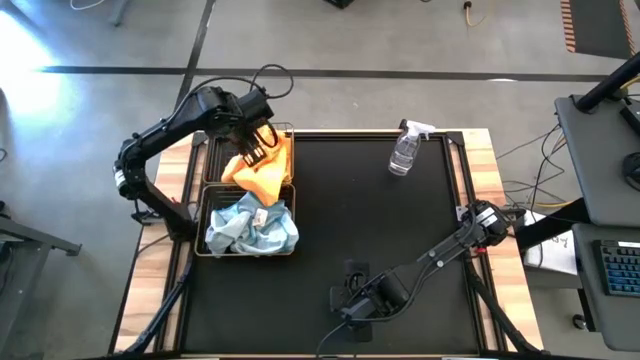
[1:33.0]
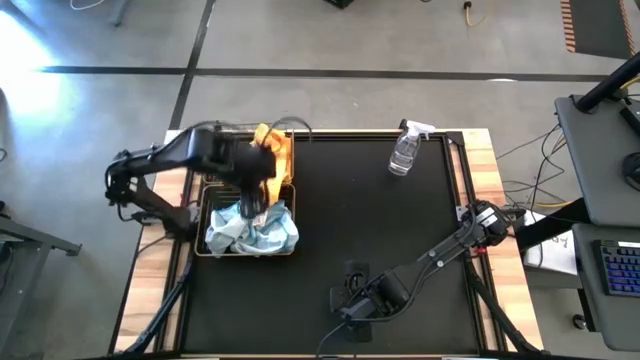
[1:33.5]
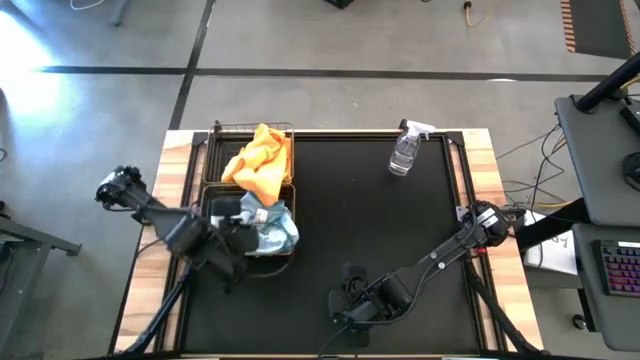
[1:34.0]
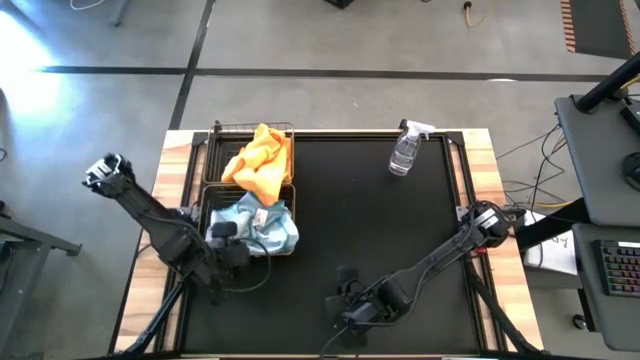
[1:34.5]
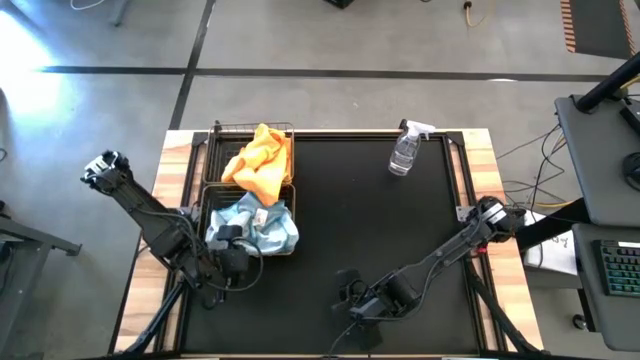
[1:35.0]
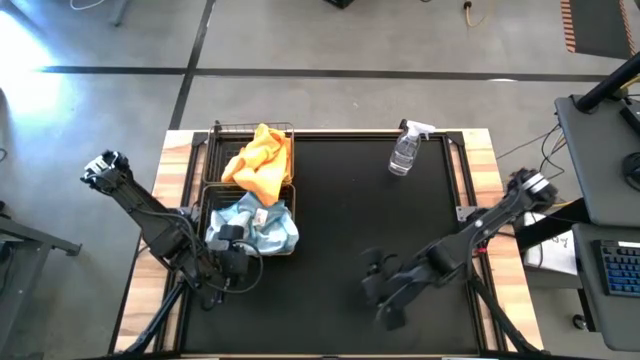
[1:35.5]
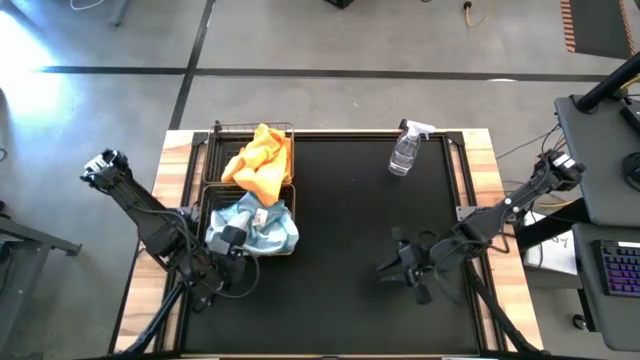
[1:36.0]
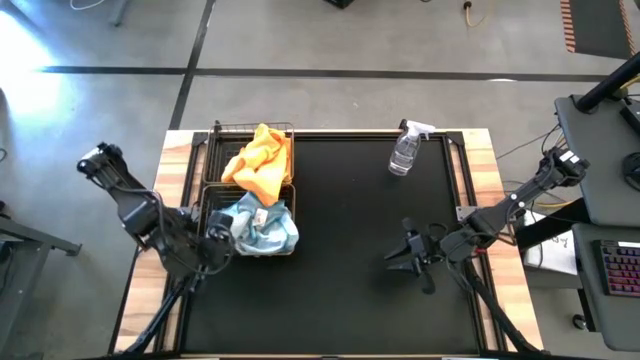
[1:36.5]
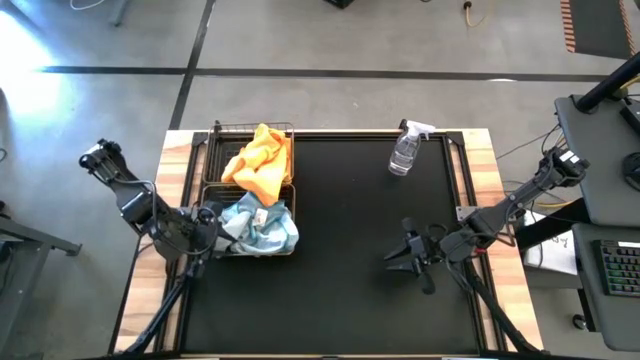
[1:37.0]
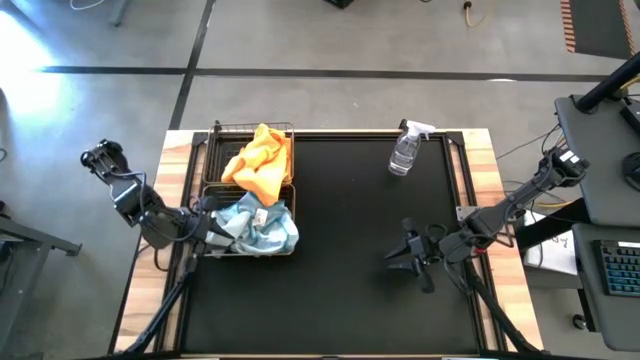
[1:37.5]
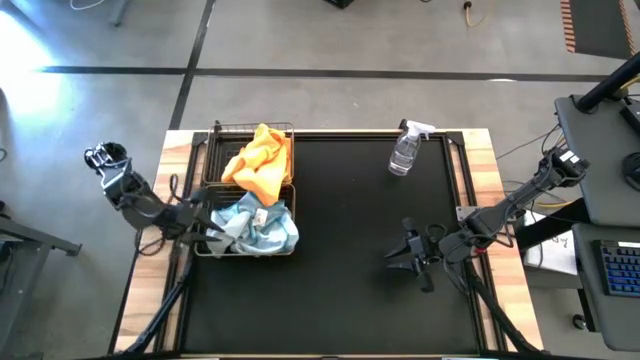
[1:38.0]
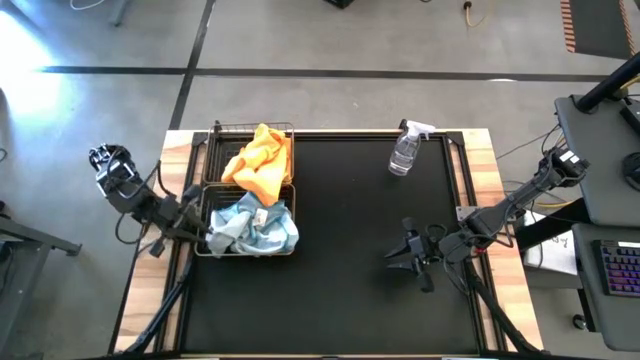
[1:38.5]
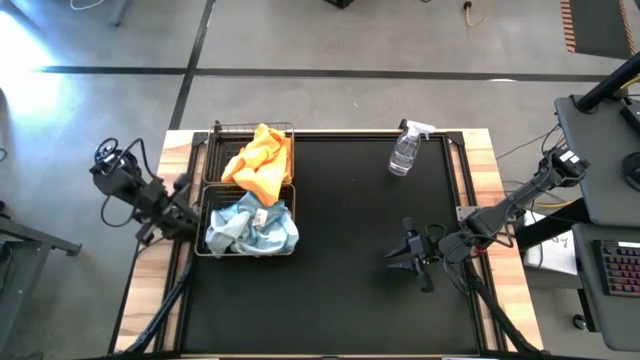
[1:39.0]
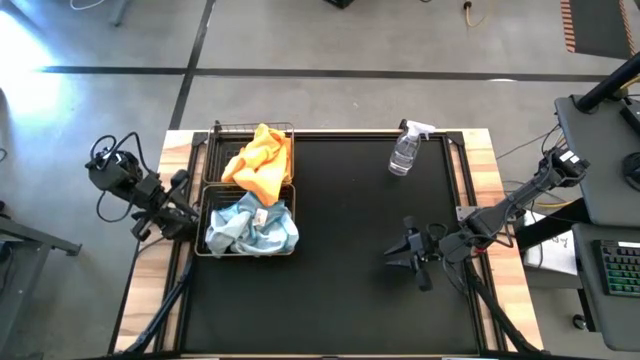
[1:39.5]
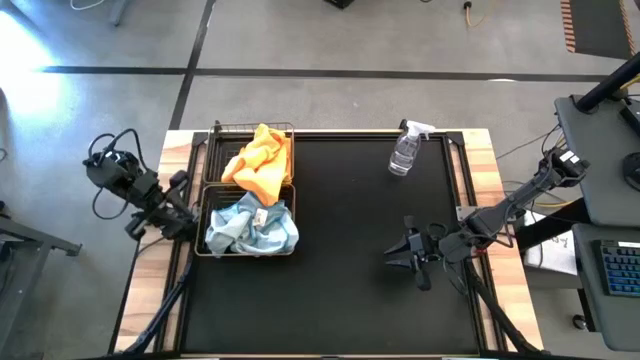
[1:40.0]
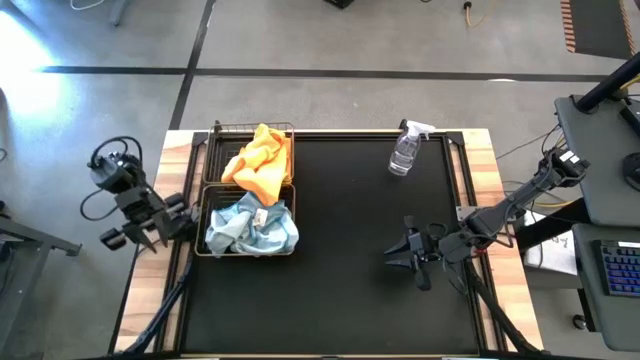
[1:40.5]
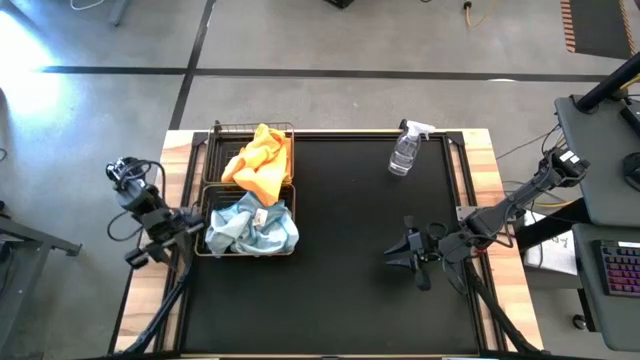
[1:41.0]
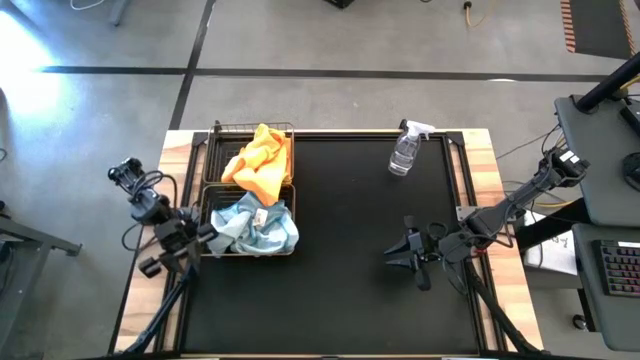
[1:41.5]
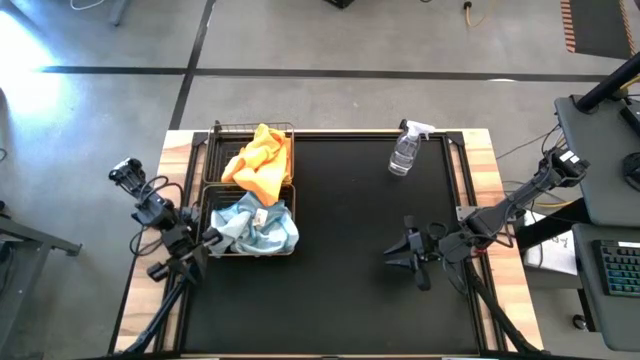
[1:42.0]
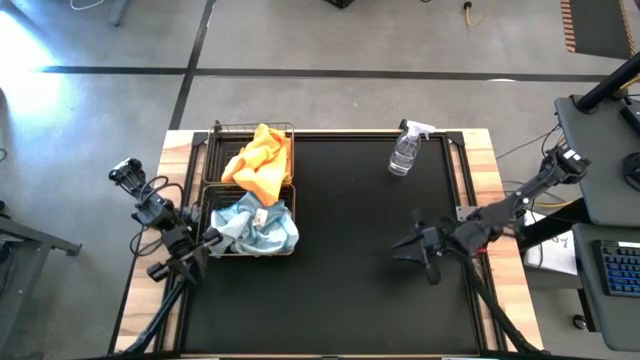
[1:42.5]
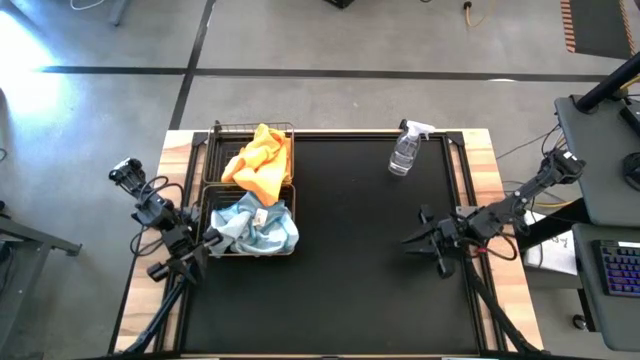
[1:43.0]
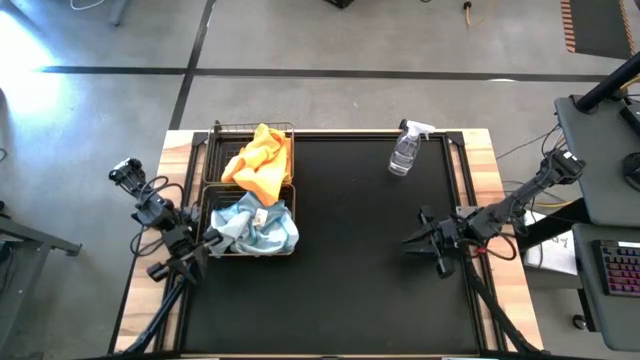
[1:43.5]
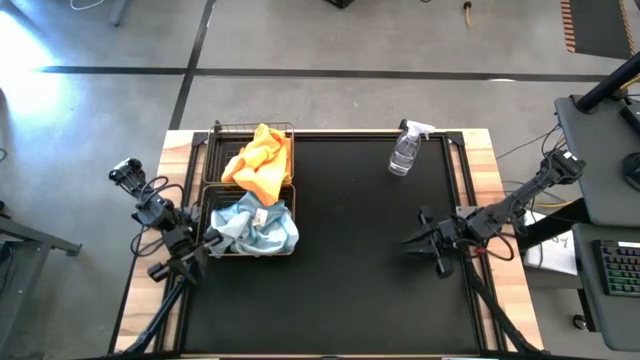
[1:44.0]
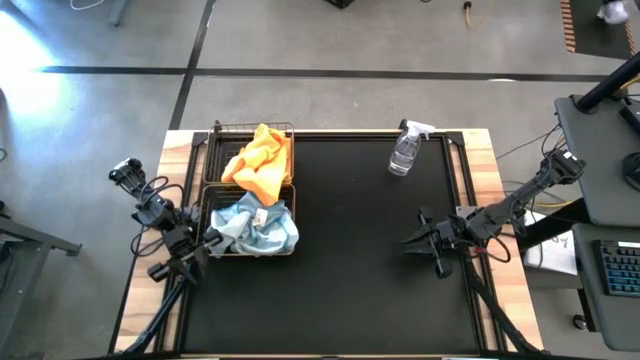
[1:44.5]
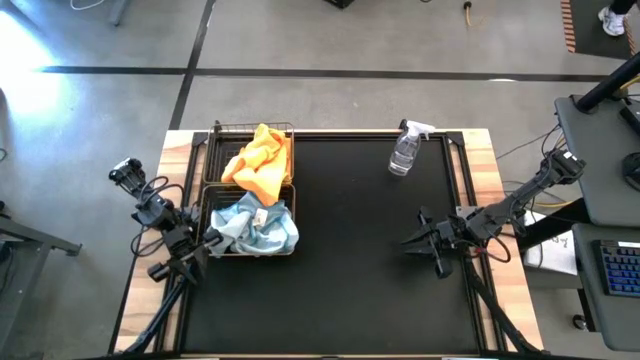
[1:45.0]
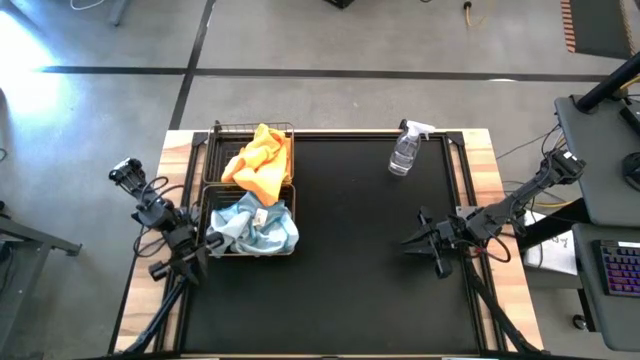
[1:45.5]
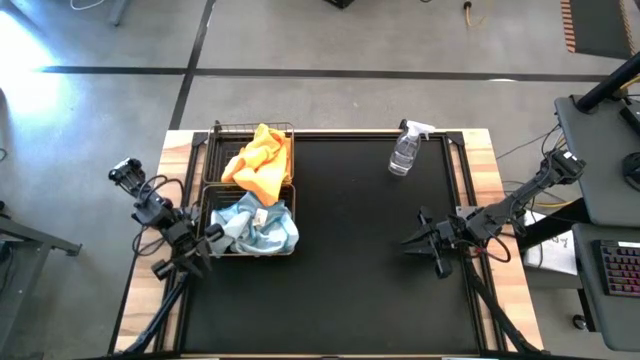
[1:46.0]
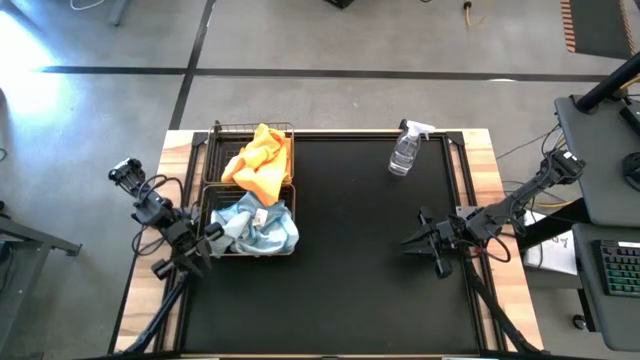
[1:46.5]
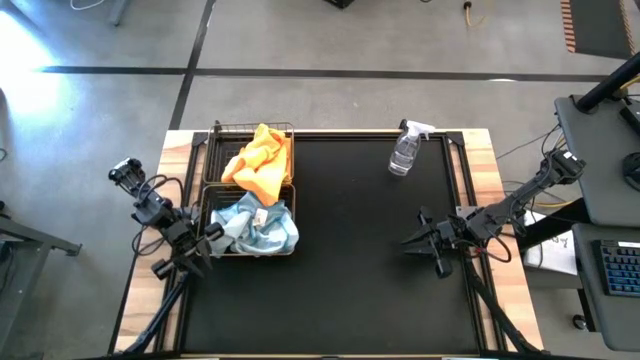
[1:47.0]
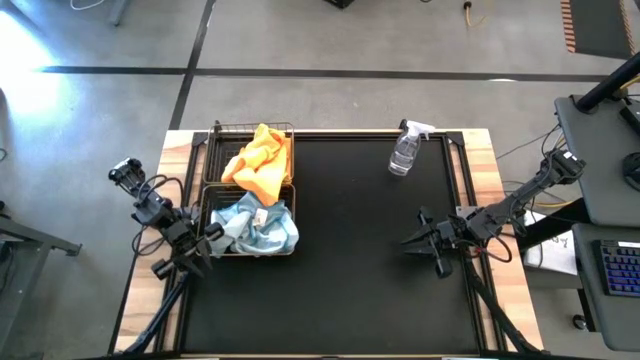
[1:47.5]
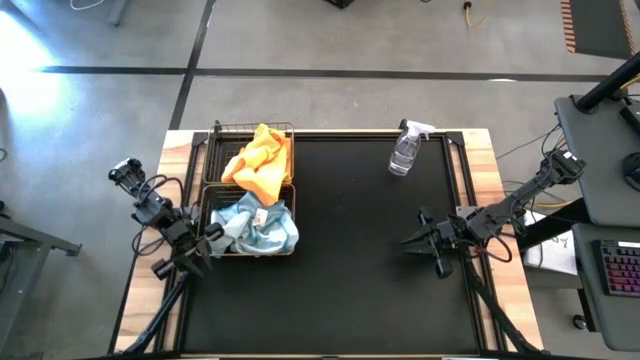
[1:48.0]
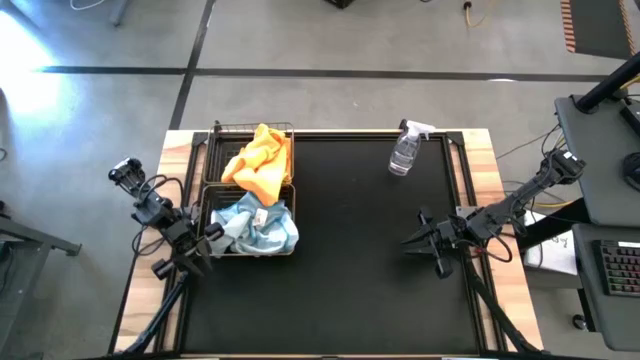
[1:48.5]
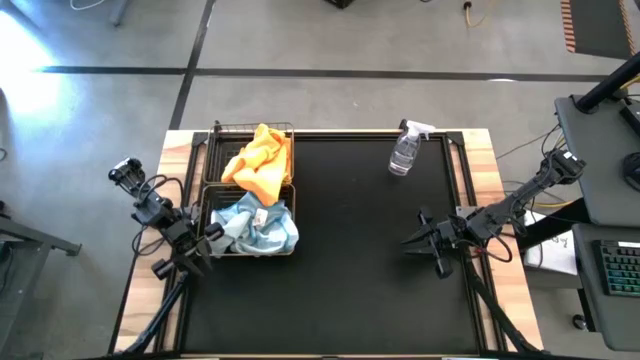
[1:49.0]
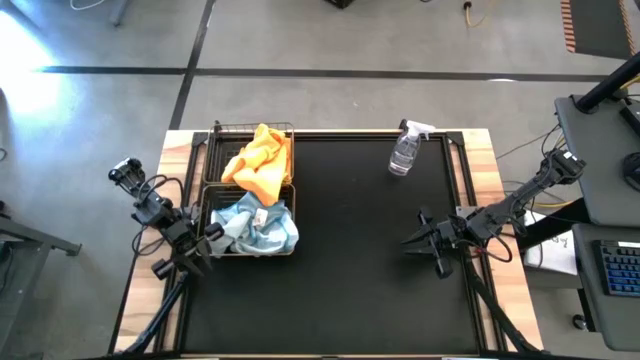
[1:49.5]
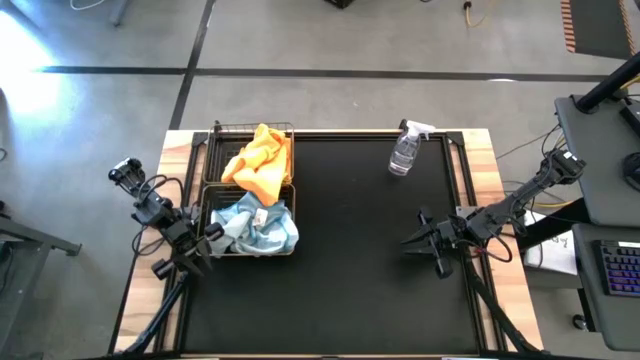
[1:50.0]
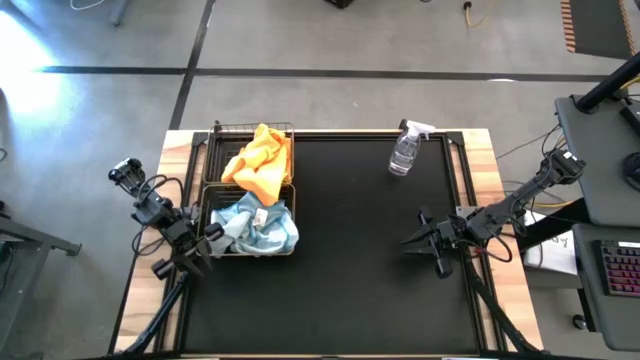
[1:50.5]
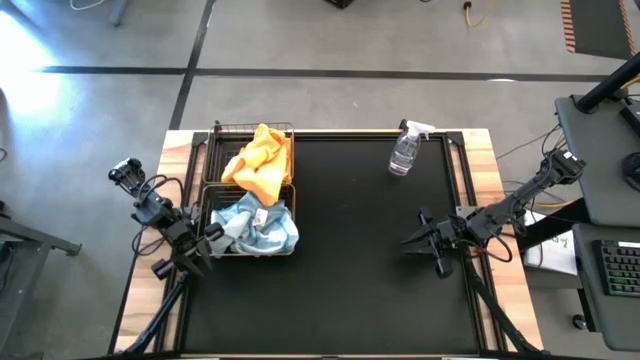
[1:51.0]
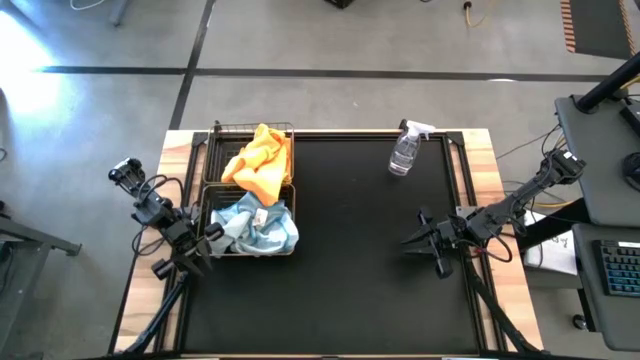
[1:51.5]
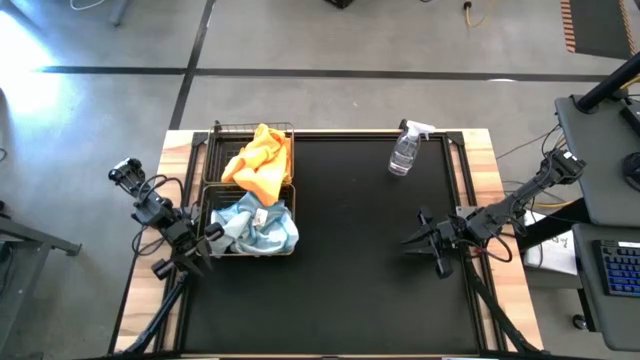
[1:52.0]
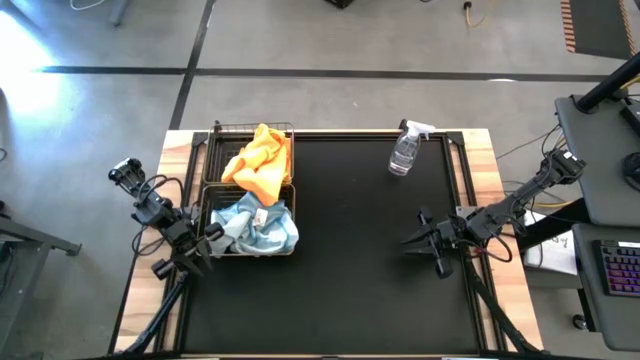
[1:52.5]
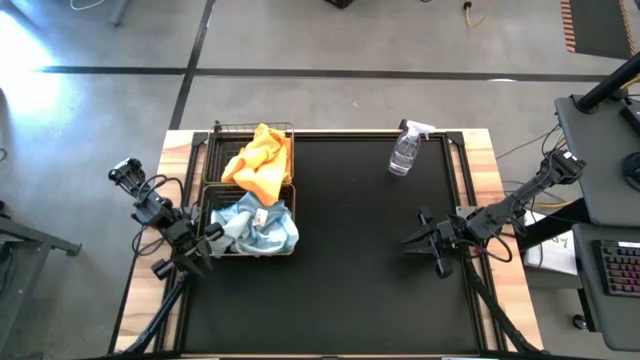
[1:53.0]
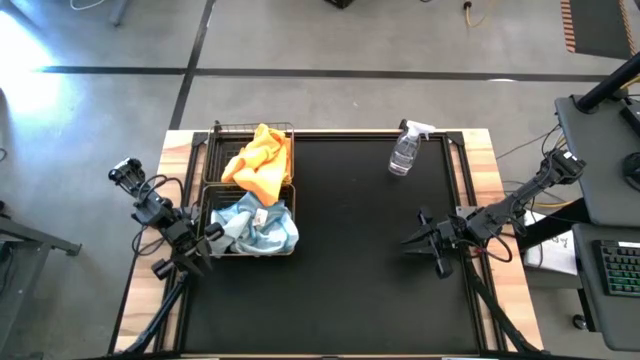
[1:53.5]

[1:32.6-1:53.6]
Task: Sort microfiber towel by color & place in baskets
Return to Home Position

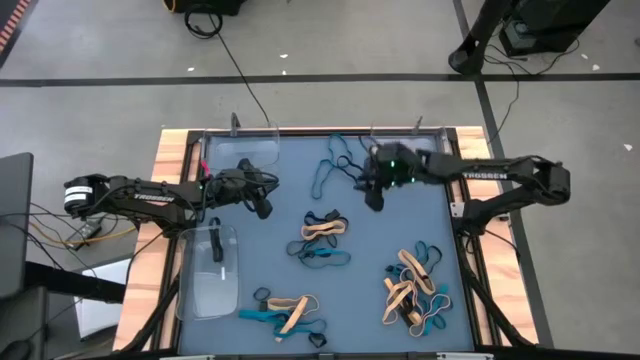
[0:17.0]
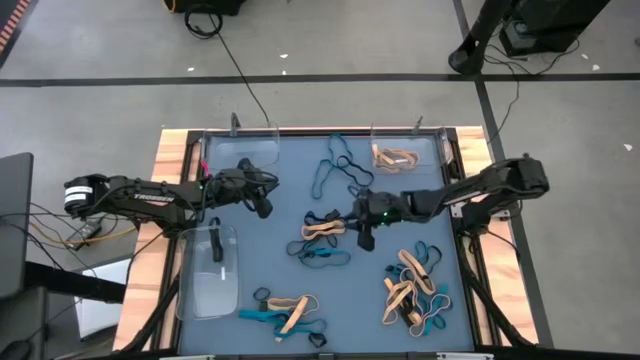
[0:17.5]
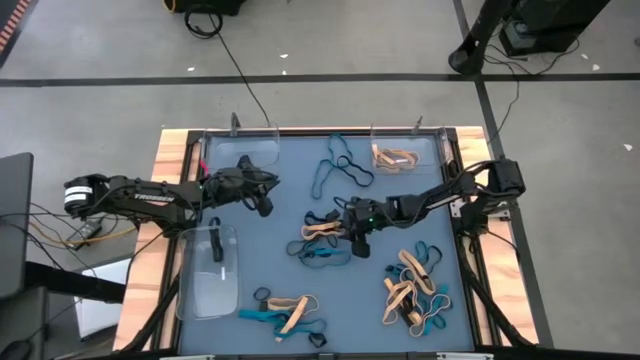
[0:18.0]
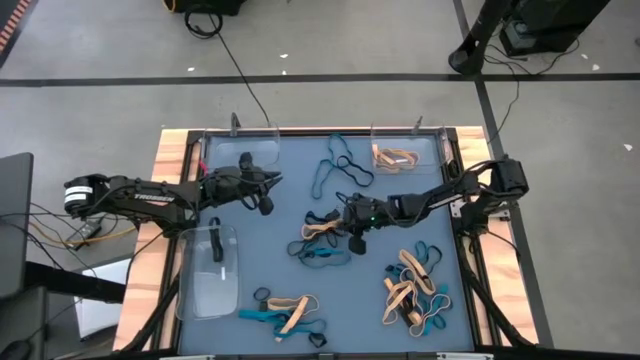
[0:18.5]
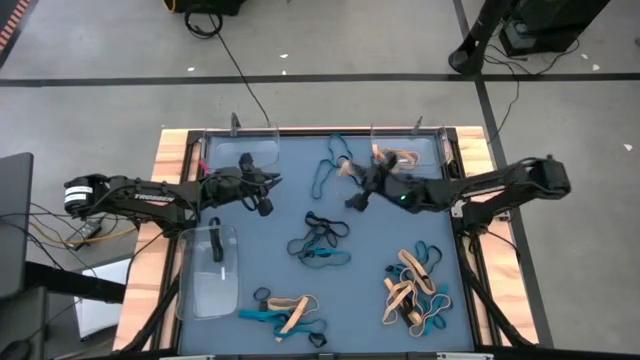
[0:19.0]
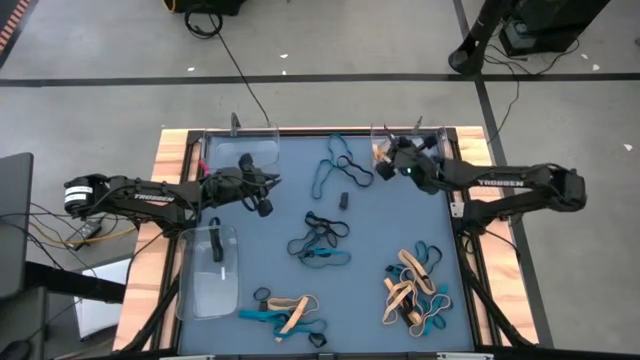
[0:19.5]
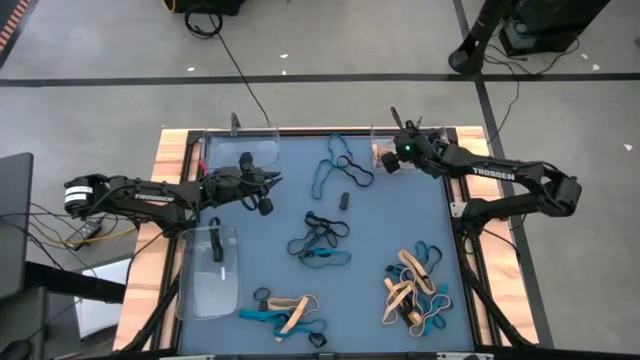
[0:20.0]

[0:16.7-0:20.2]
Task: Sort rubber bands into baskets
Put the yellow rubber band into the top right transparent bin
